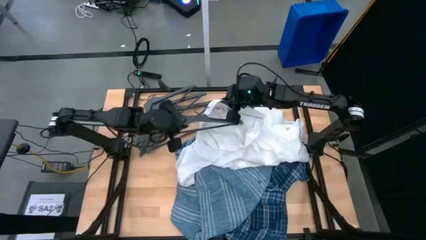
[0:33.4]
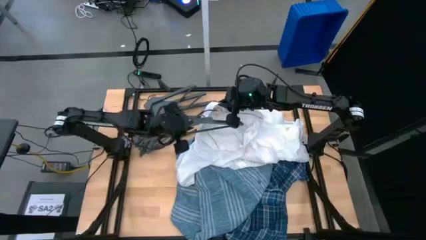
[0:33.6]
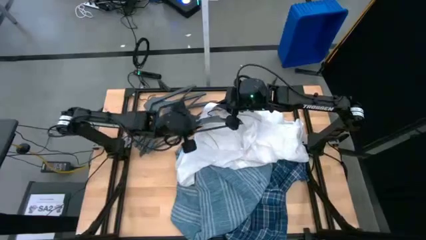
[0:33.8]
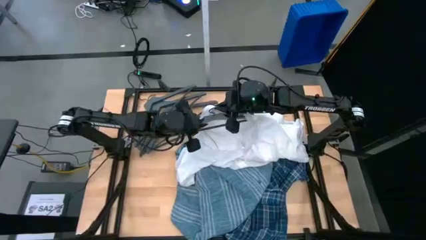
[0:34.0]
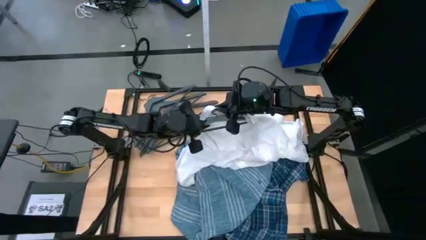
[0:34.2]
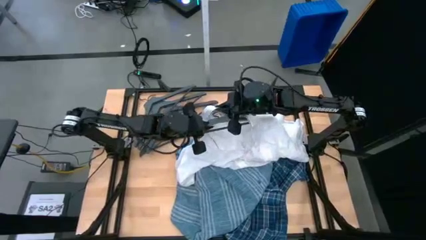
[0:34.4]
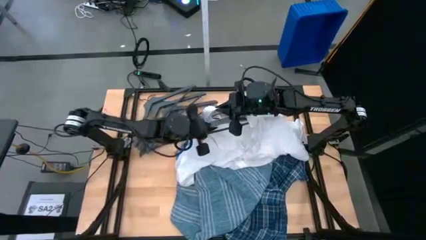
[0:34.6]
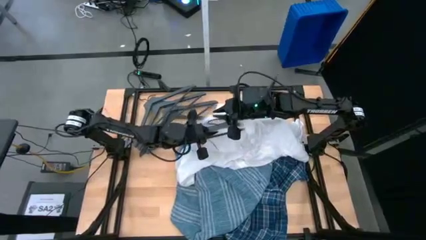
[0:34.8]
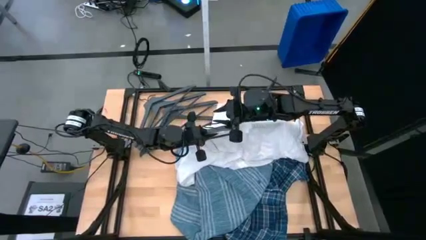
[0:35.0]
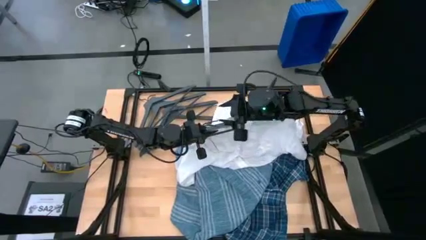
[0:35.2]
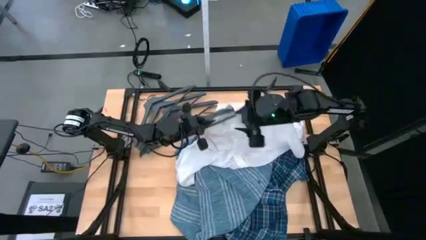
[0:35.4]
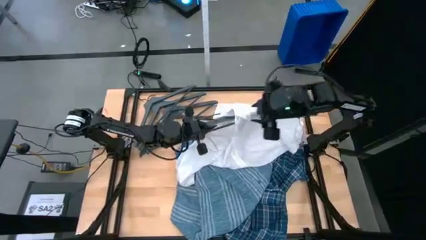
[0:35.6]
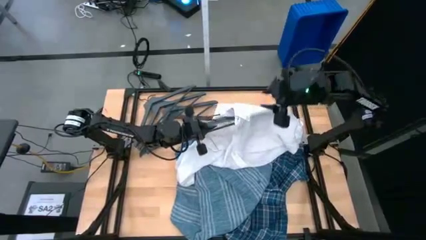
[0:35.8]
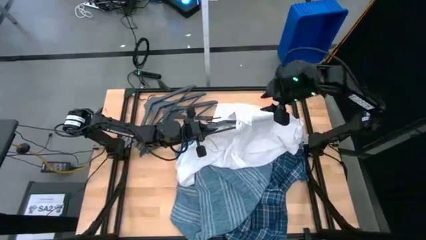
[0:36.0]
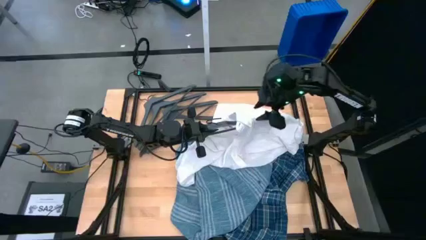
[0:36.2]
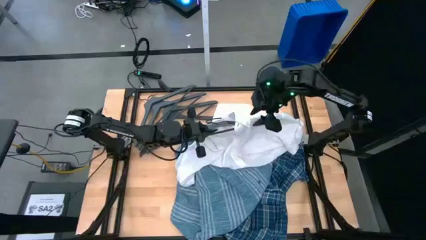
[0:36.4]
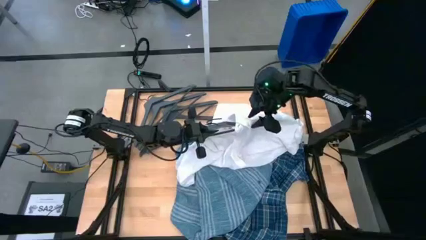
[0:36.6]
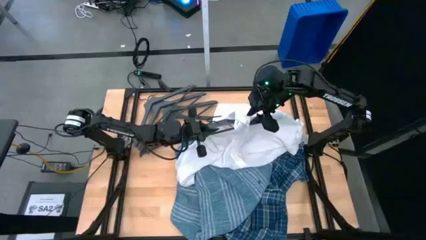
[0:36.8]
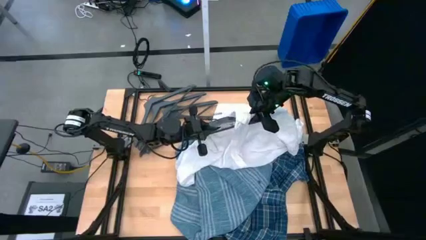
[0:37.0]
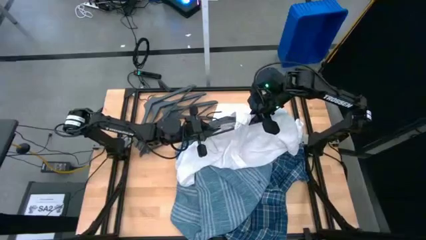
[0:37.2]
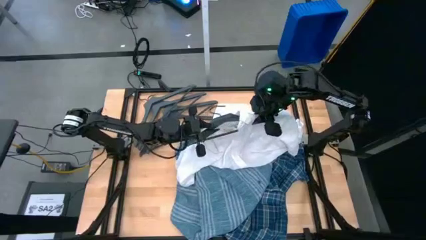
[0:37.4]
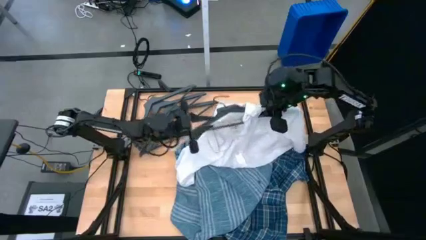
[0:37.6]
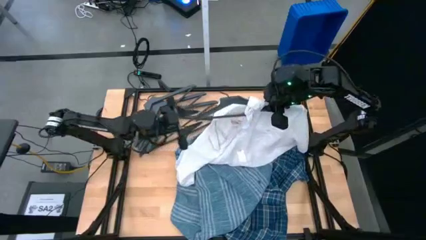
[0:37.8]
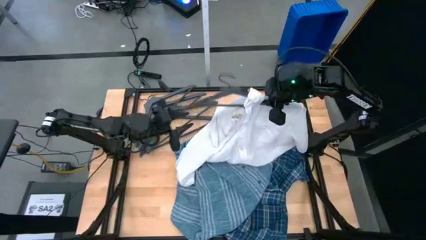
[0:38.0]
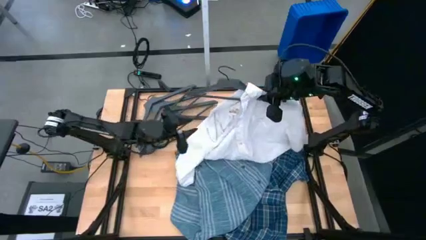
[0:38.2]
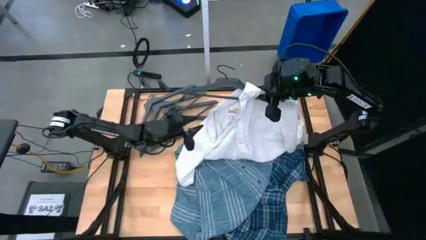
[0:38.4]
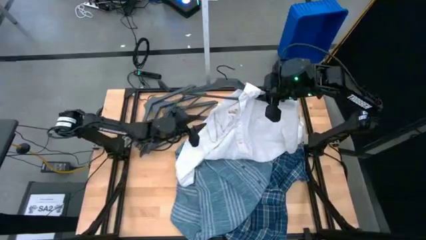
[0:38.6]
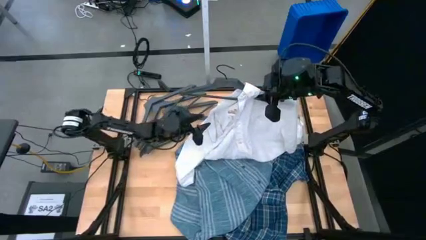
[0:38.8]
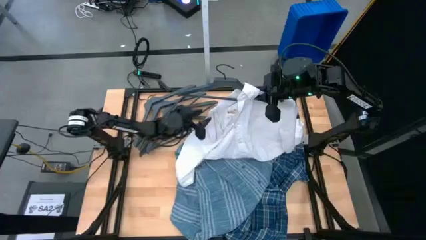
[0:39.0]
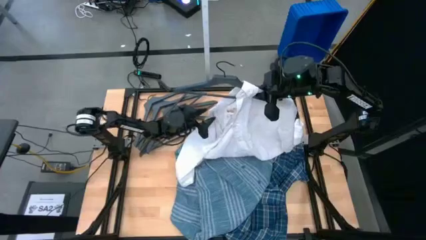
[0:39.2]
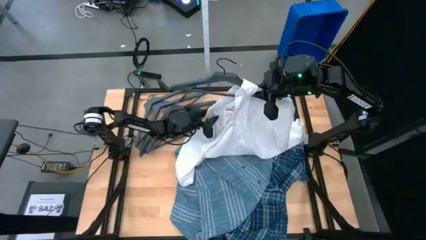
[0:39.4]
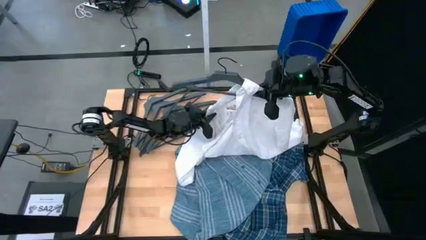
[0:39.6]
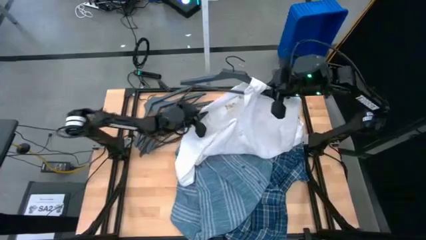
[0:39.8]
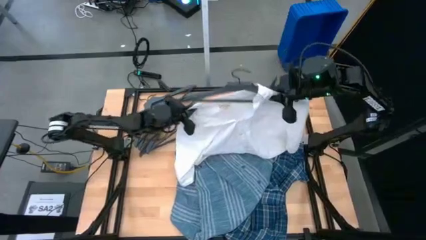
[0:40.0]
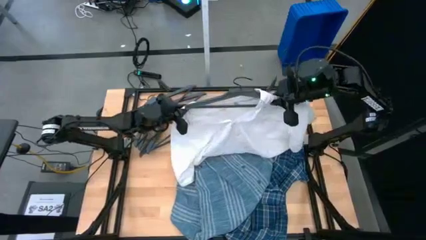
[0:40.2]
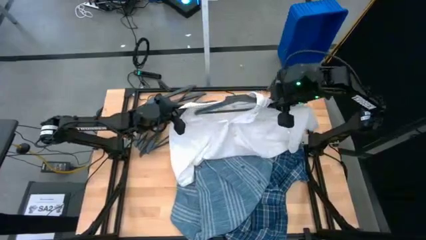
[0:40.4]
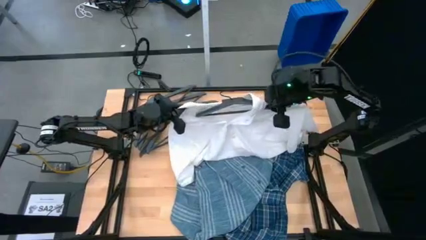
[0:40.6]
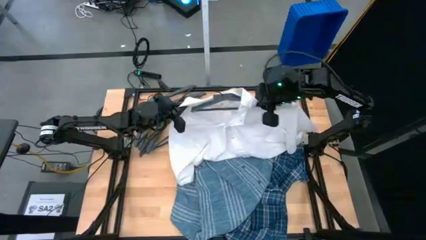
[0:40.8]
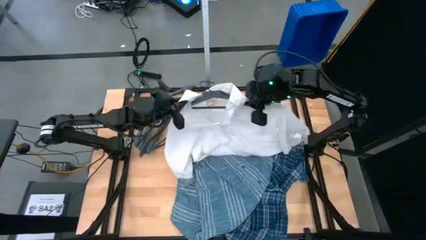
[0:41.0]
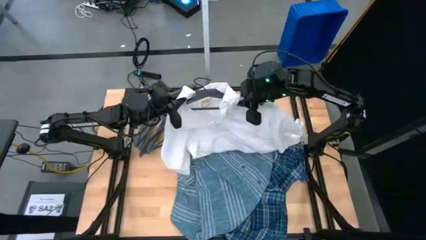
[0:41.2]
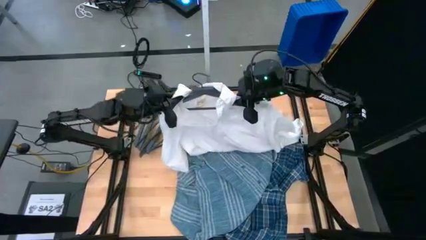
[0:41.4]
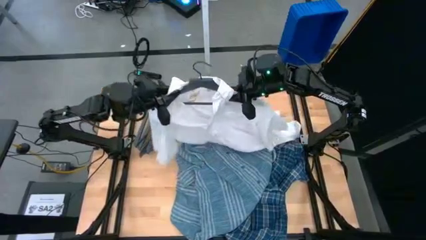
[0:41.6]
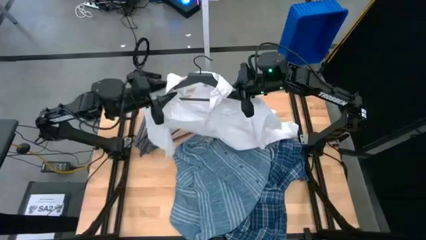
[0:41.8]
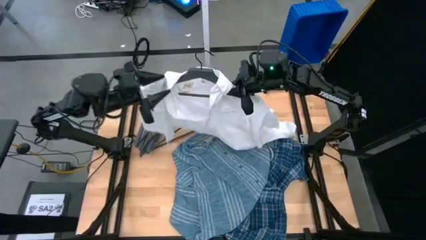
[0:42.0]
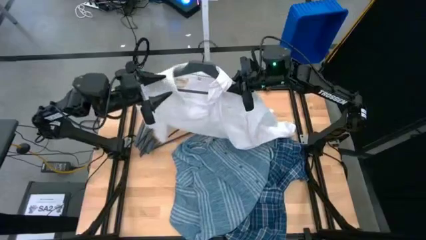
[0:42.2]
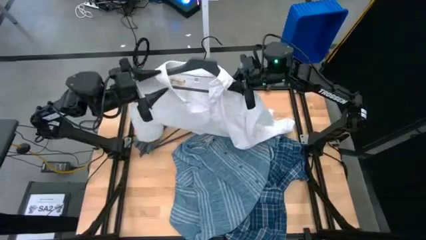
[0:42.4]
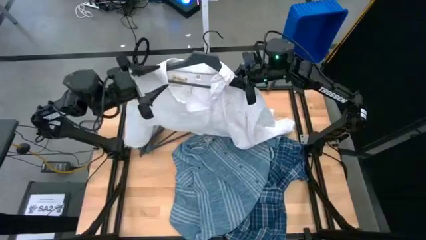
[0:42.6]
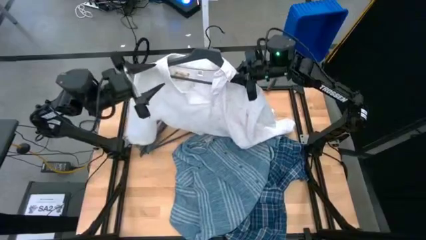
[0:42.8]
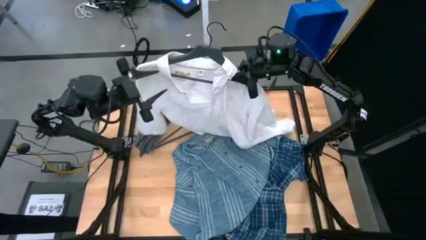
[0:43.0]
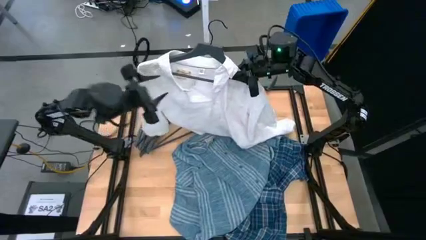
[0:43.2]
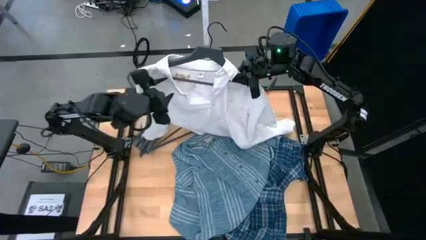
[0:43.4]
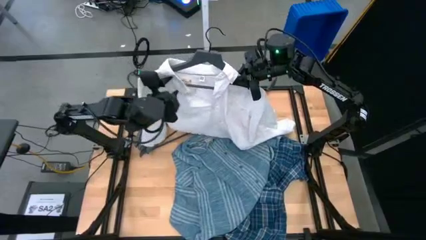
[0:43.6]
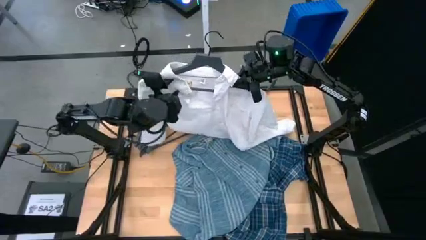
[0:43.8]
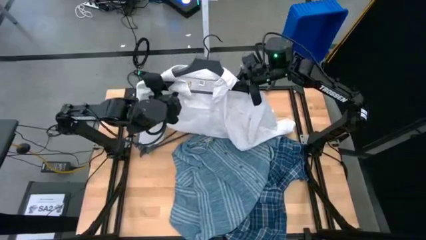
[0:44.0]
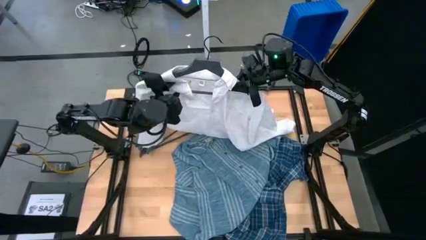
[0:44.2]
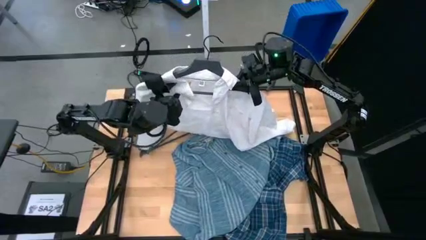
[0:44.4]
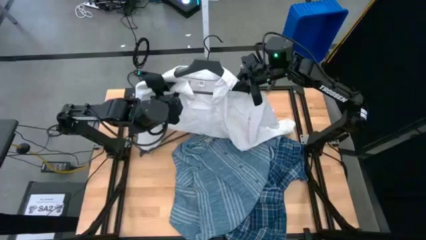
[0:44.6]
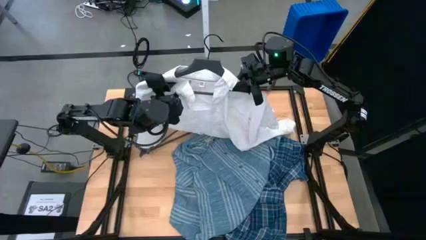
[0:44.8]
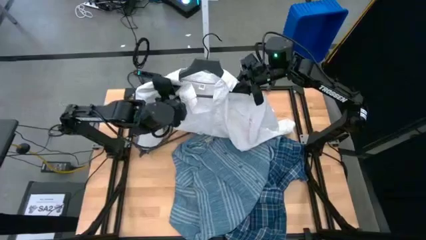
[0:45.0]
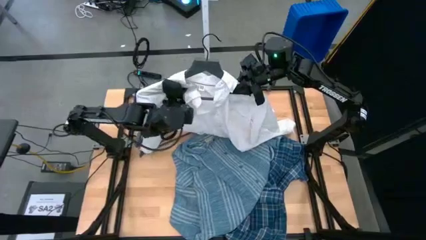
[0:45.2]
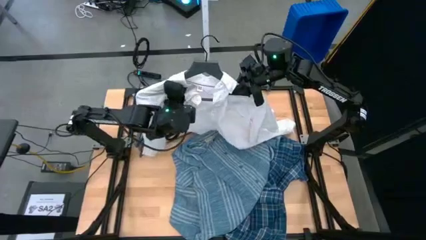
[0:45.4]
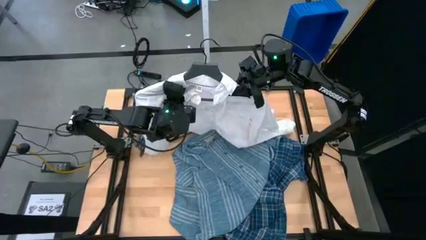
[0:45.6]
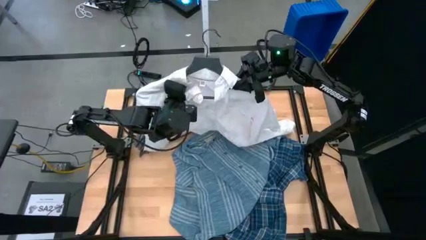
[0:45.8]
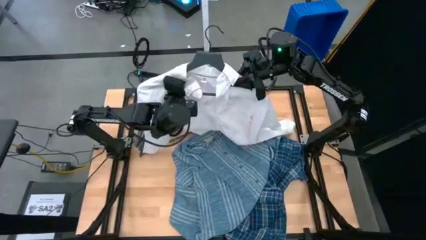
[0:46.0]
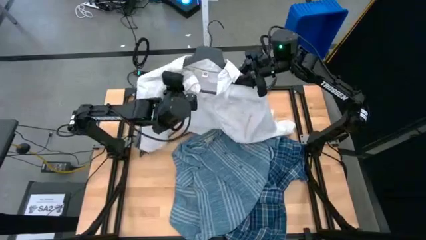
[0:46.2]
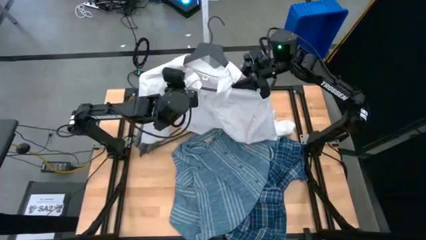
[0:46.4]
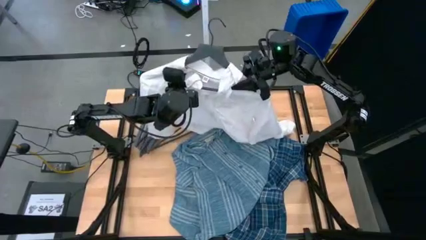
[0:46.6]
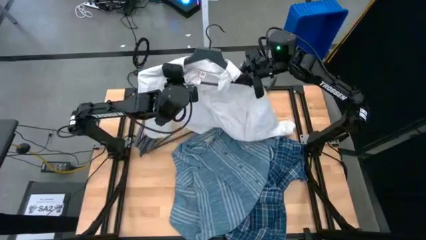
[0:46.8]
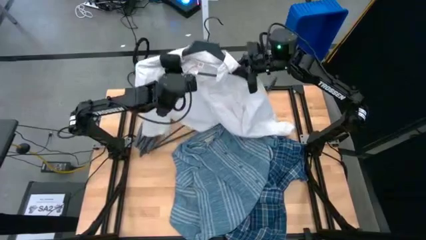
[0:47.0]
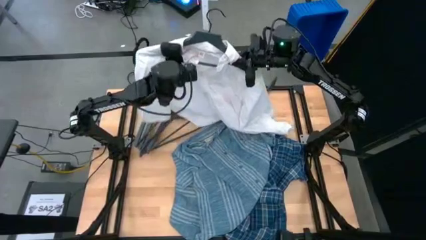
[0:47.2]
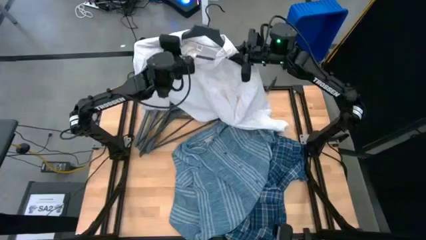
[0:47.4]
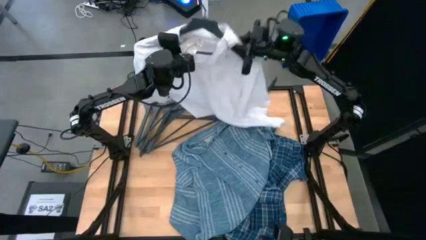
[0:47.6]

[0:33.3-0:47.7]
Task: Hang clothes
Insert the black hanger into the white shirt

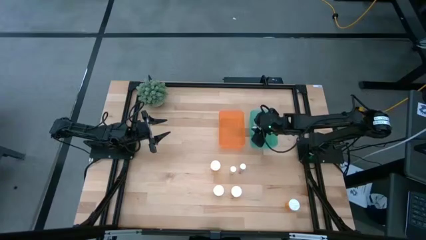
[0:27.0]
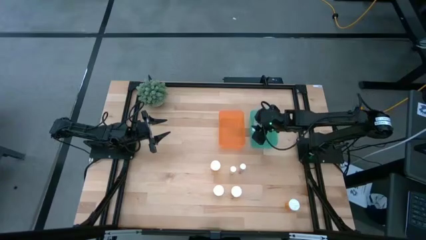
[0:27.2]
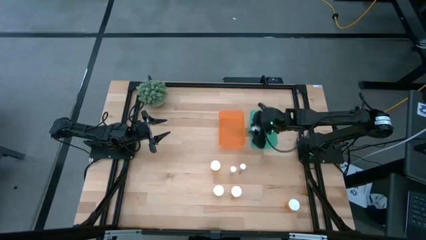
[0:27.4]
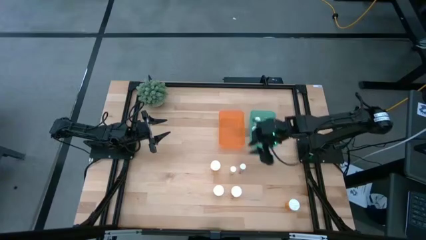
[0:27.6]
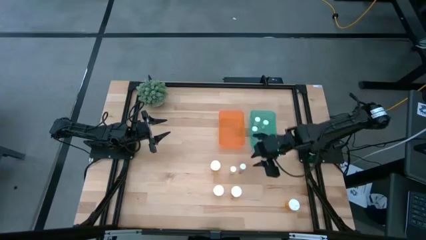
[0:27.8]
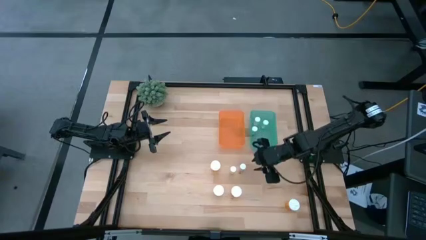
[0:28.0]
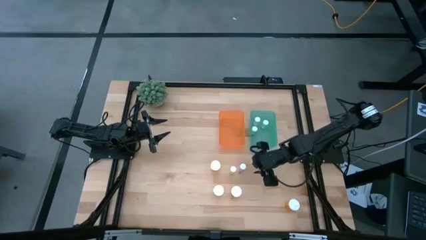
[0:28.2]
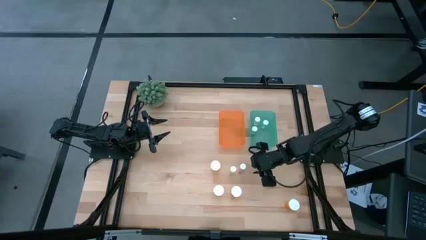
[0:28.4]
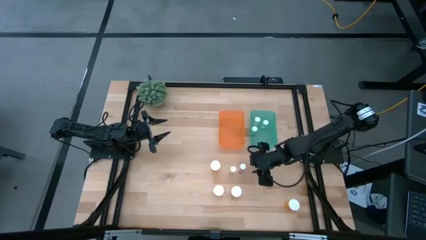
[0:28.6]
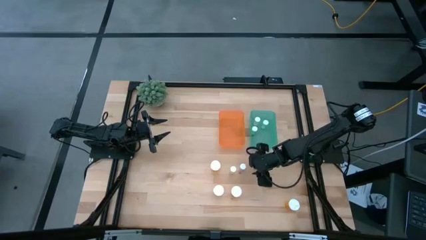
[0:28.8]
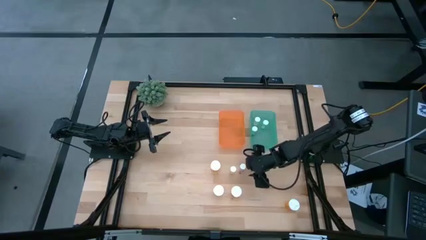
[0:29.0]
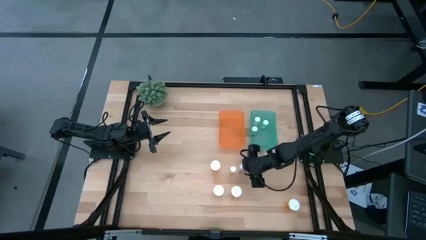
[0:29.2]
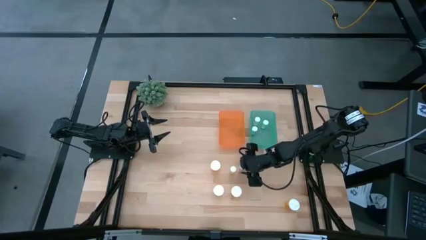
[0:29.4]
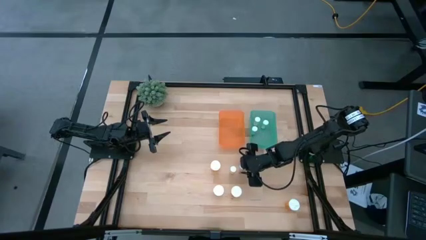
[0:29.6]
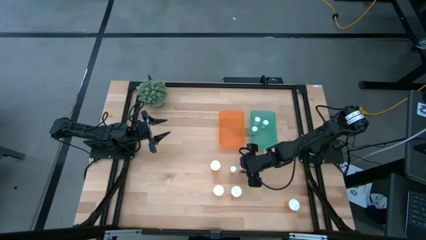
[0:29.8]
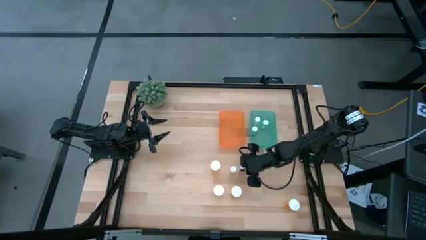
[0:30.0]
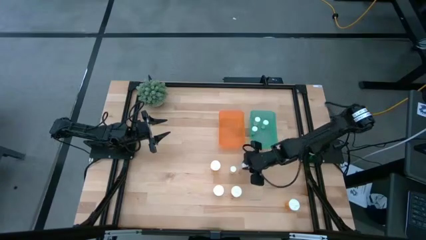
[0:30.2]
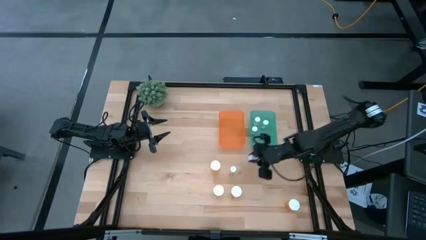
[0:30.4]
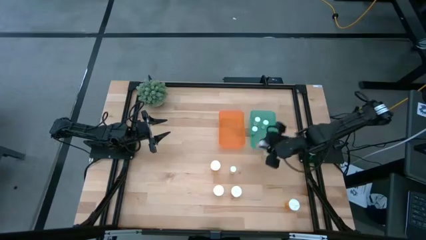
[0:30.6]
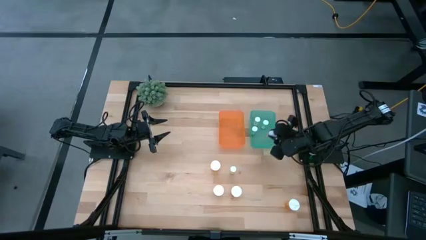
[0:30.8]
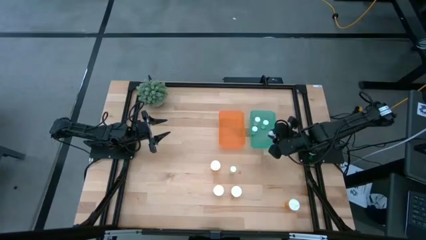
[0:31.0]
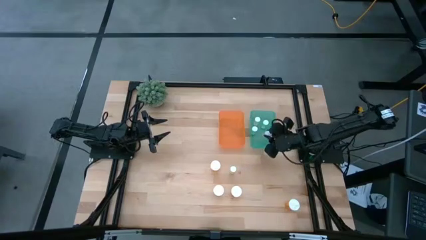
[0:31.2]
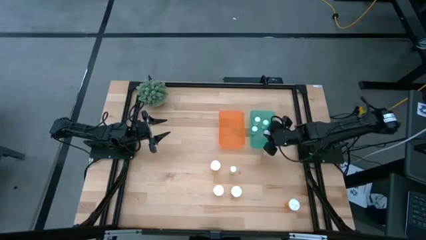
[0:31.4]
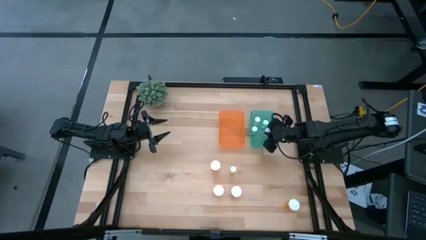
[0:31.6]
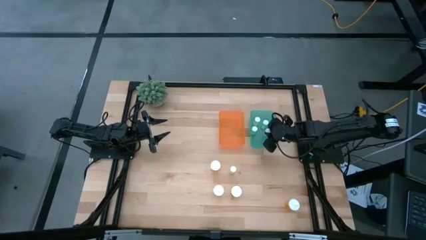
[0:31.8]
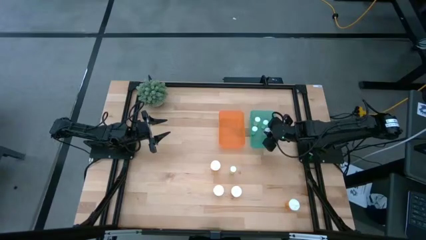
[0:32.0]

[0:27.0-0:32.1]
Task: Pick and place medicine bottles into bin by pill shape (circle, oval)
Put the small pink pill bottle into the green bin
